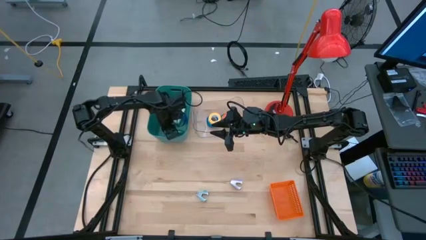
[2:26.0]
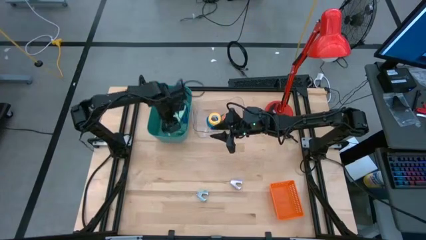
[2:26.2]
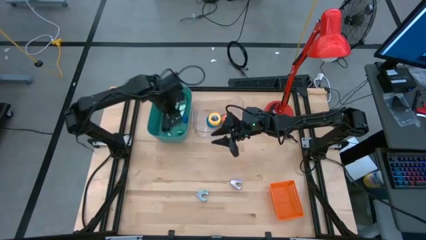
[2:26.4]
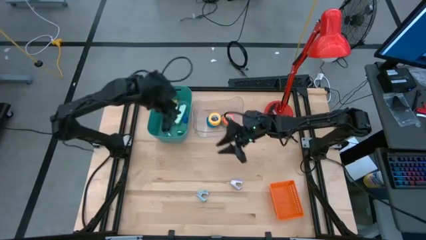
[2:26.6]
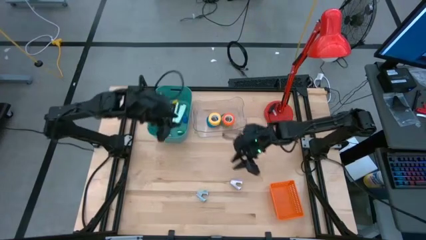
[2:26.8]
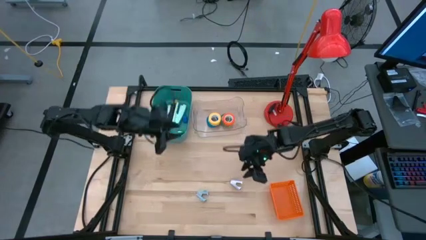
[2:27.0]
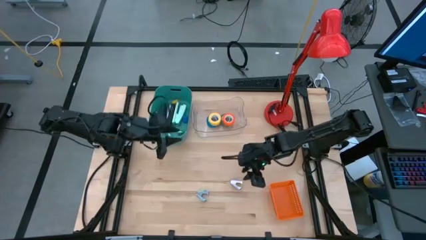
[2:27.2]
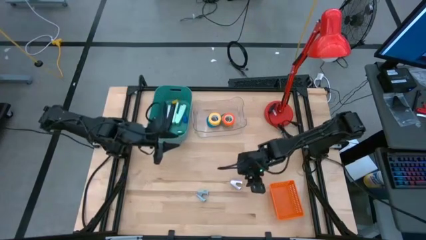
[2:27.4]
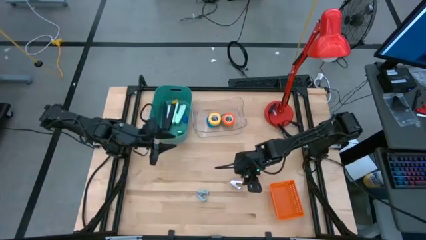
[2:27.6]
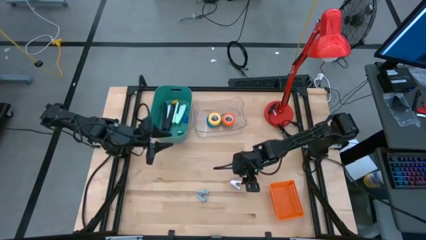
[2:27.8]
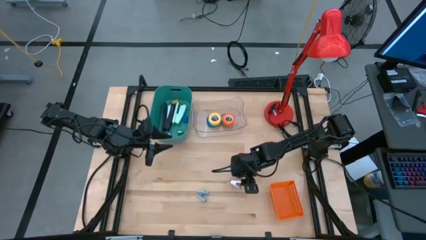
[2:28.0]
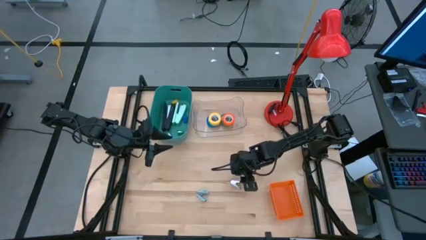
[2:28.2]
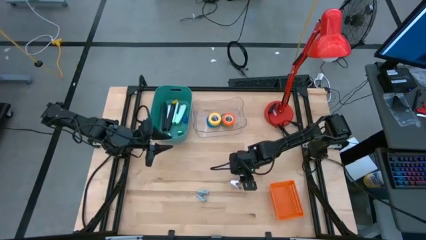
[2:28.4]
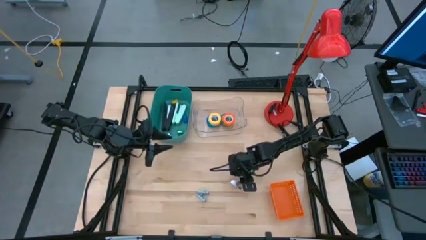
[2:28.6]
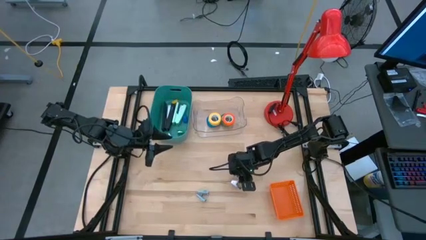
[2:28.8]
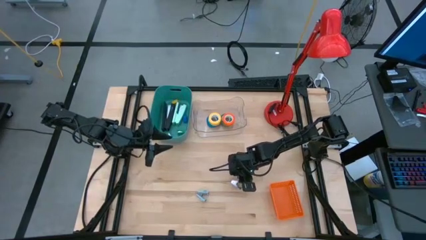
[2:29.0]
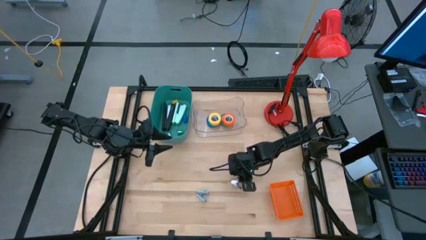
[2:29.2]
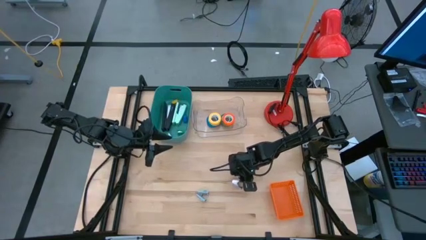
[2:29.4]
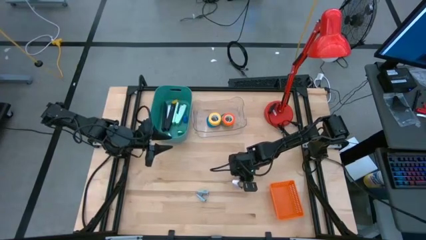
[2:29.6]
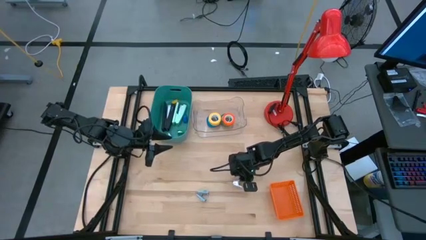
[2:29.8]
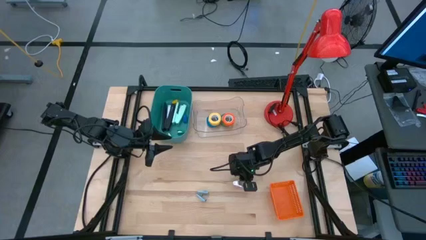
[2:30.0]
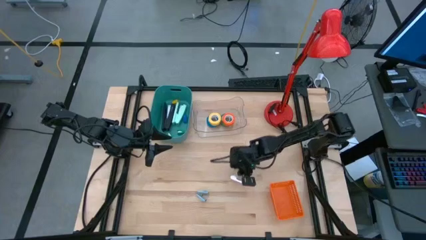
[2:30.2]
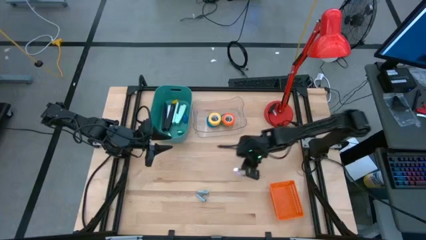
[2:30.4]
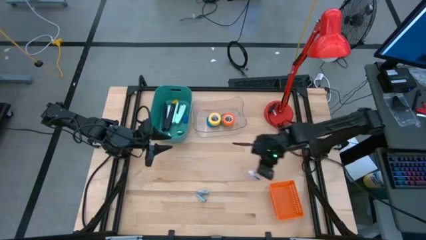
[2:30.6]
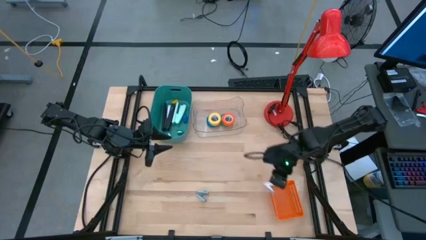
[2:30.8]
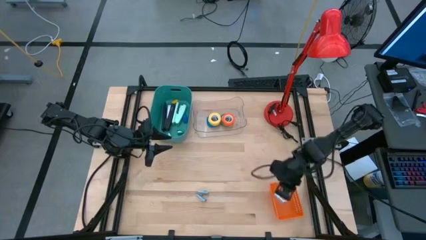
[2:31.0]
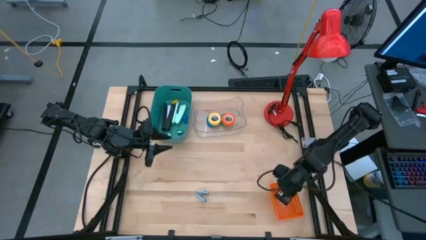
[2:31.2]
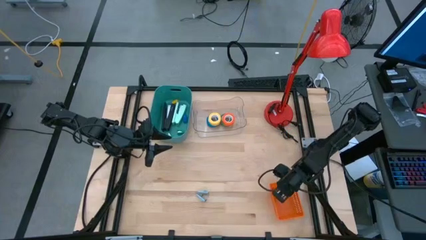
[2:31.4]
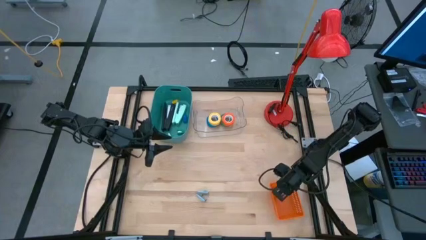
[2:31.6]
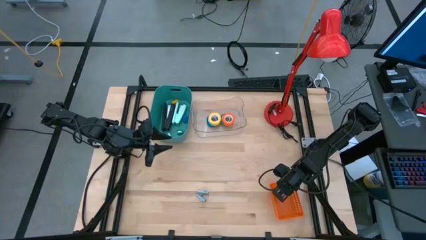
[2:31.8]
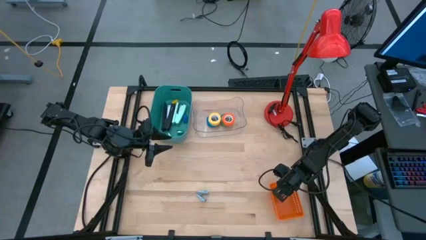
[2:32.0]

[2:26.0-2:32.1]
Task: Pick and place Stapler, Stapler remover, tape
Put the purple stapler remover into the orange bin

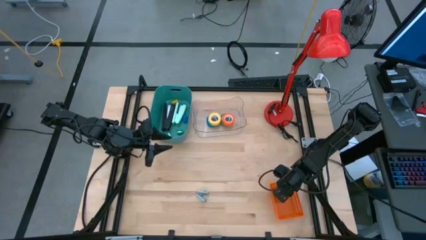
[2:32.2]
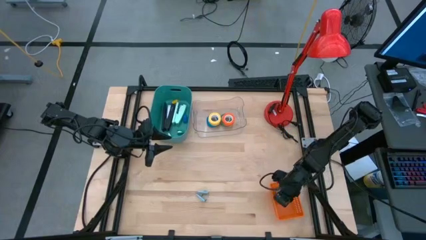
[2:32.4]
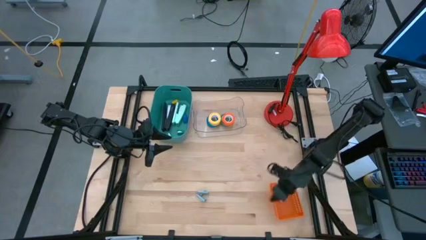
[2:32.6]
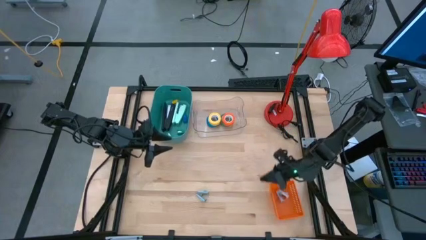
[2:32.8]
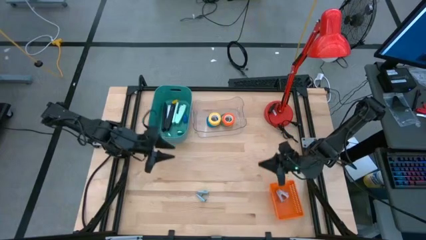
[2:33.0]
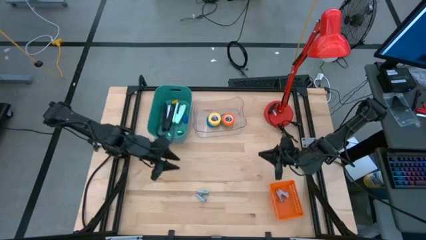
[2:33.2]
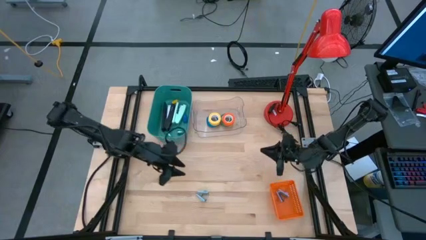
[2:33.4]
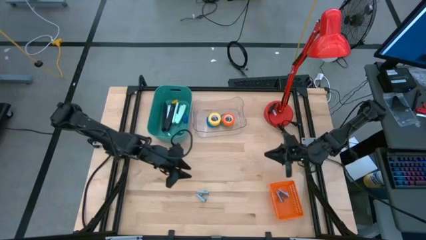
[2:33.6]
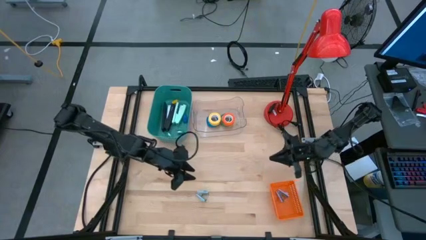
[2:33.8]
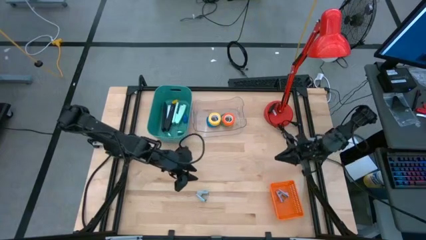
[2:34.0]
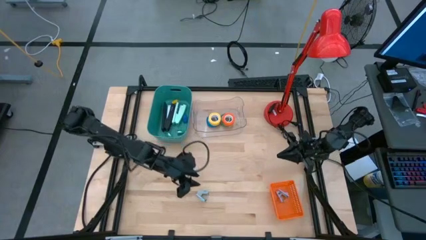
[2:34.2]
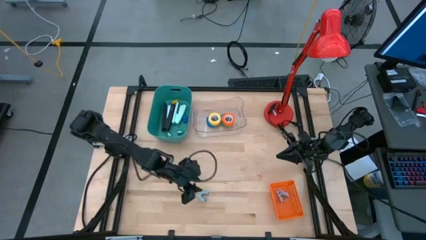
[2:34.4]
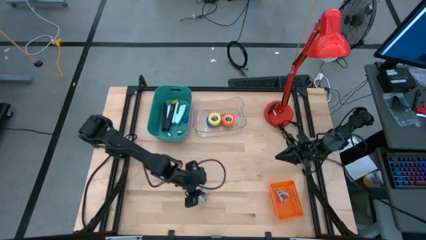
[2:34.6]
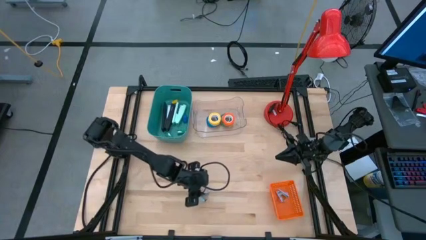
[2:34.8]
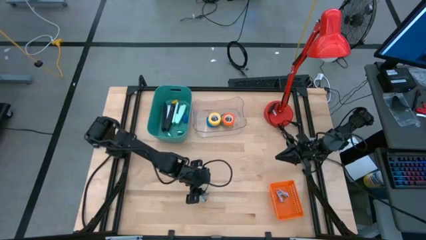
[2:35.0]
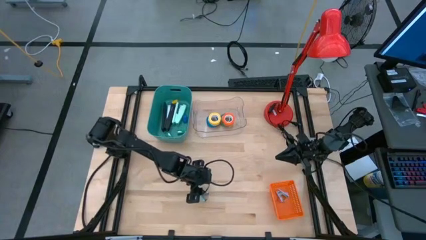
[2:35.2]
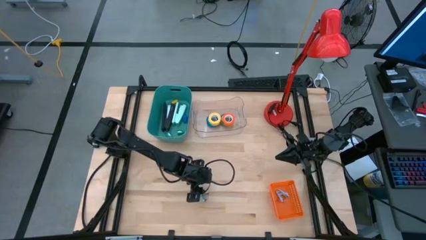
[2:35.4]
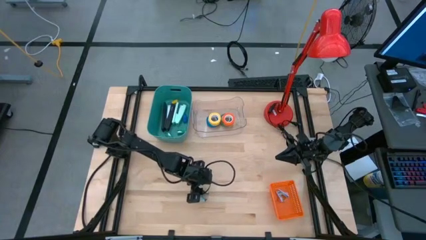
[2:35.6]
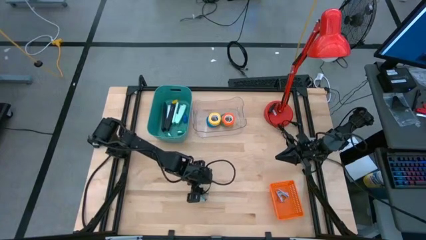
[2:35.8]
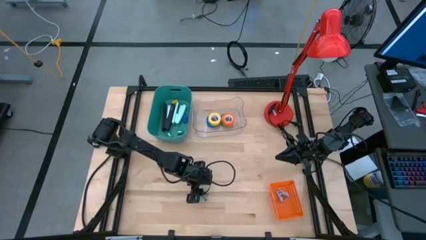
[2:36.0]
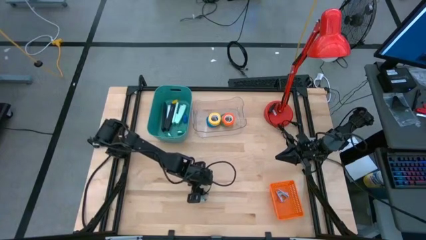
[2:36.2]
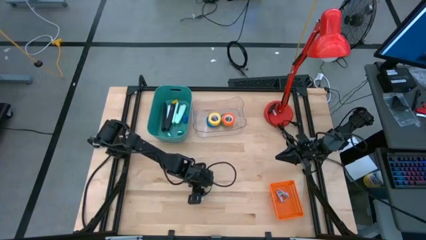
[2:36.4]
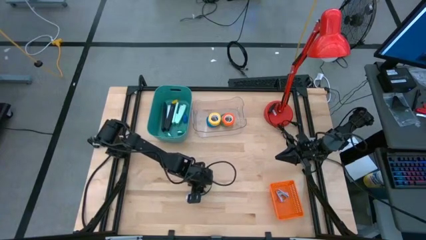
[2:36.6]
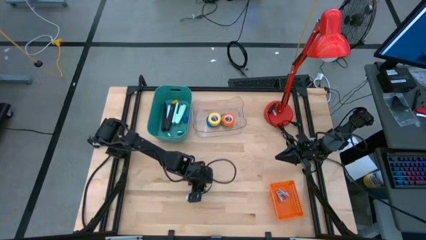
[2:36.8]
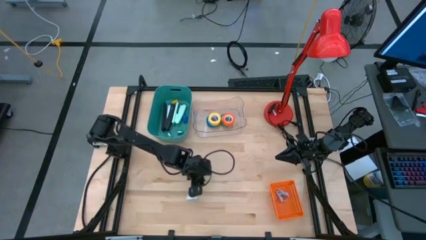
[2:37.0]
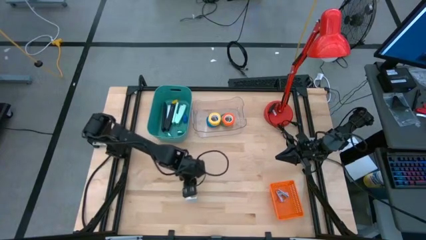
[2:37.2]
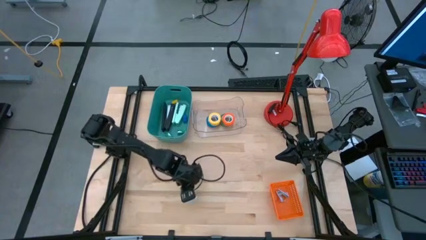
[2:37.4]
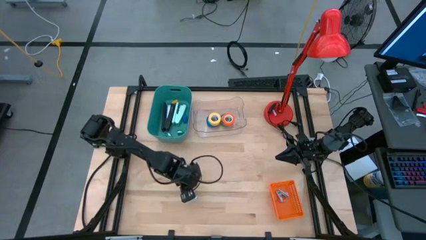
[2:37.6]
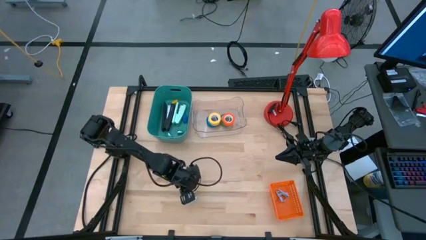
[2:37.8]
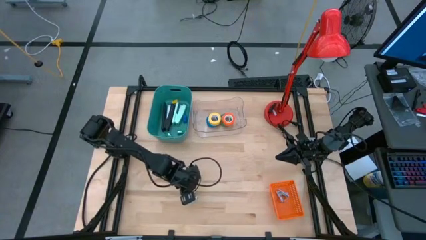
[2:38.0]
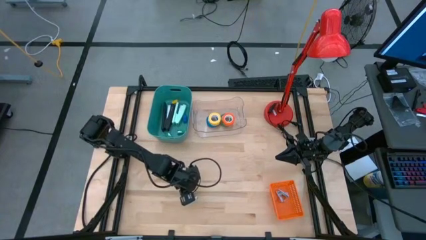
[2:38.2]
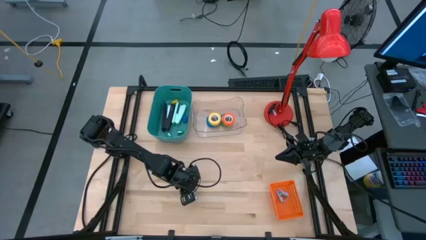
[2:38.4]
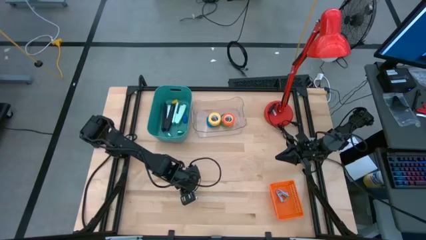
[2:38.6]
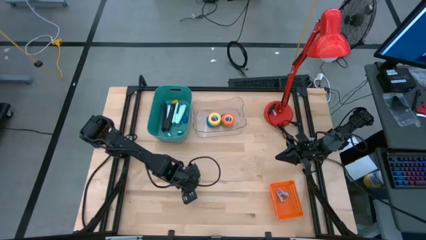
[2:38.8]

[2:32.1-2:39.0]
Put the gray stapler remover into the orange bin
